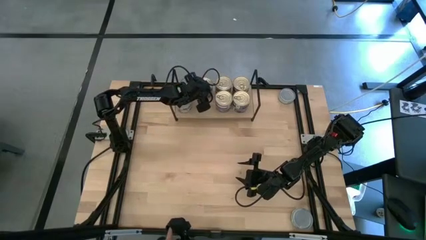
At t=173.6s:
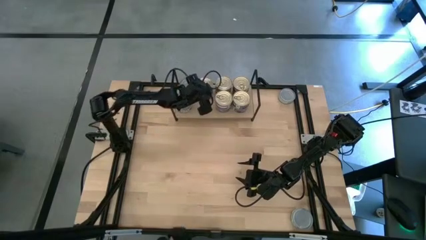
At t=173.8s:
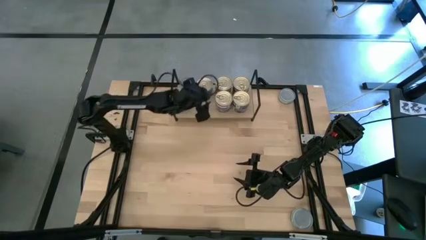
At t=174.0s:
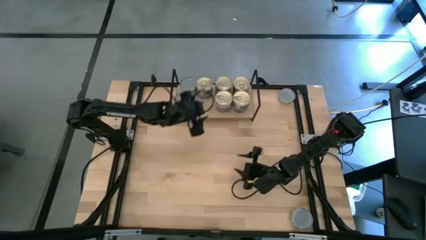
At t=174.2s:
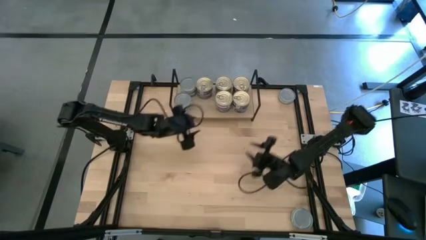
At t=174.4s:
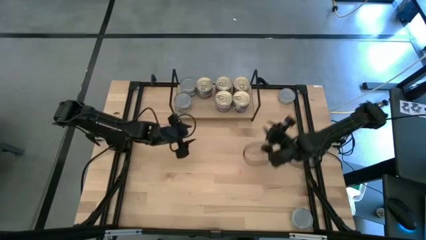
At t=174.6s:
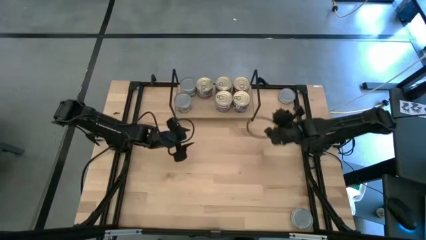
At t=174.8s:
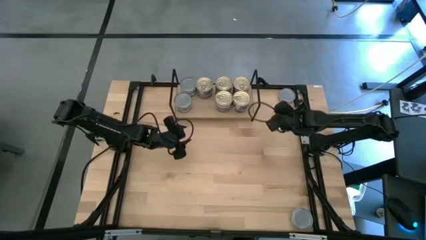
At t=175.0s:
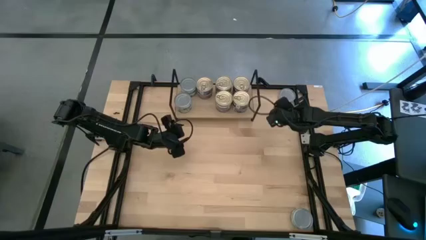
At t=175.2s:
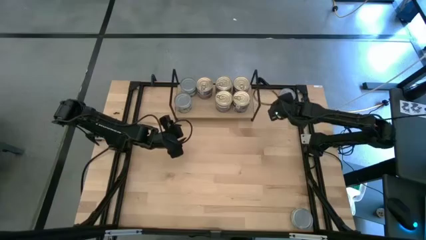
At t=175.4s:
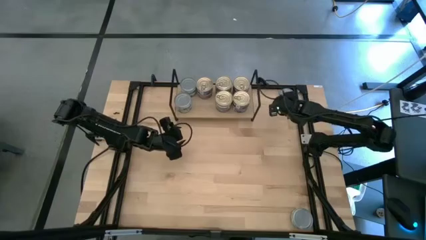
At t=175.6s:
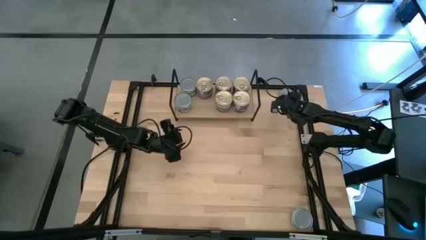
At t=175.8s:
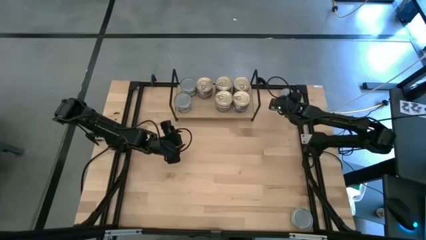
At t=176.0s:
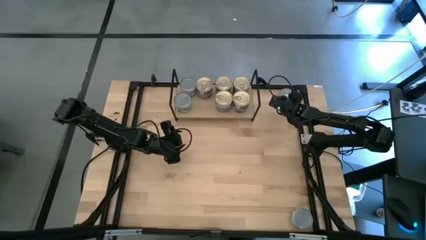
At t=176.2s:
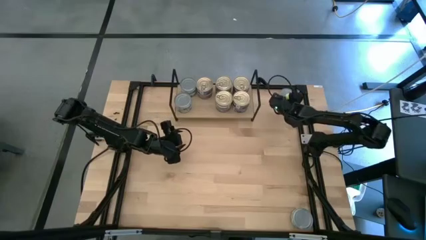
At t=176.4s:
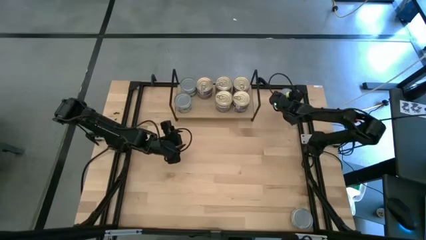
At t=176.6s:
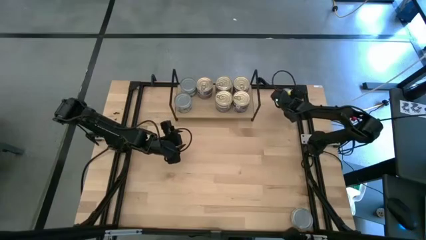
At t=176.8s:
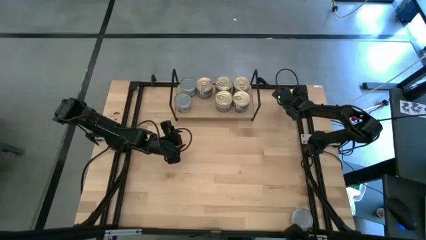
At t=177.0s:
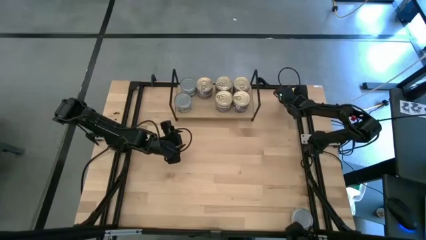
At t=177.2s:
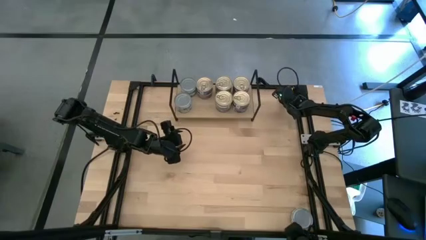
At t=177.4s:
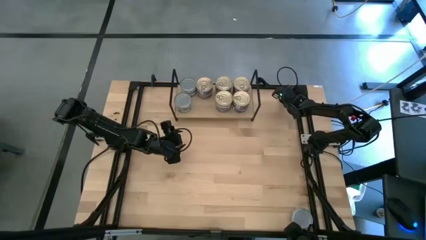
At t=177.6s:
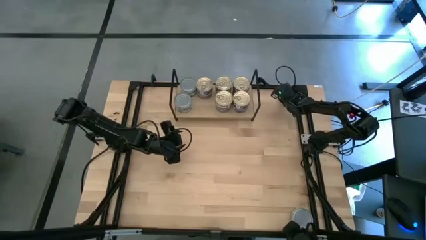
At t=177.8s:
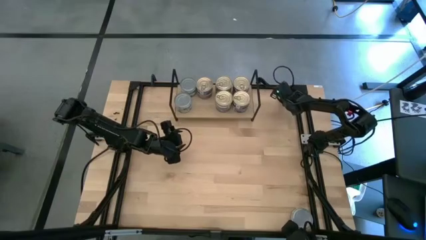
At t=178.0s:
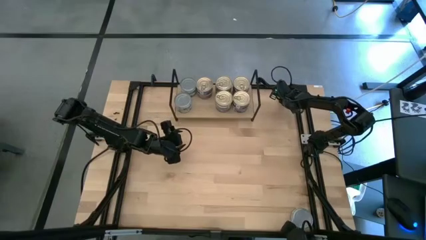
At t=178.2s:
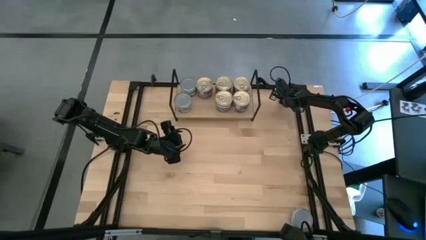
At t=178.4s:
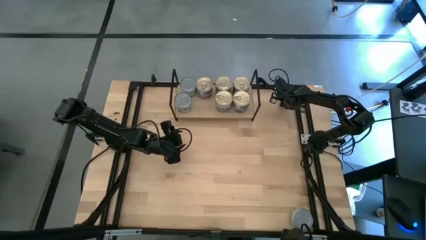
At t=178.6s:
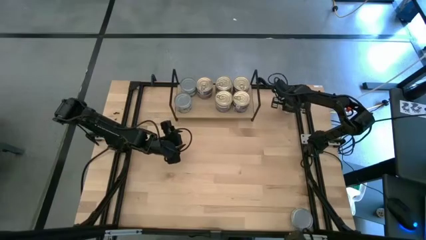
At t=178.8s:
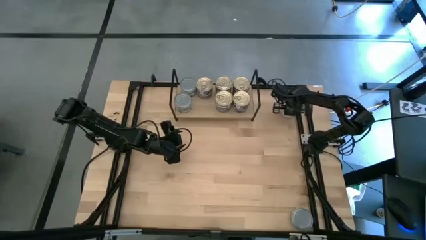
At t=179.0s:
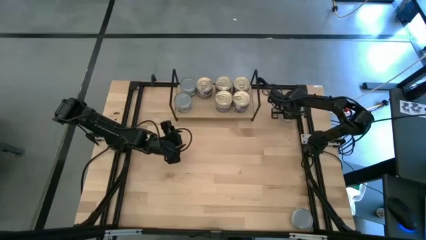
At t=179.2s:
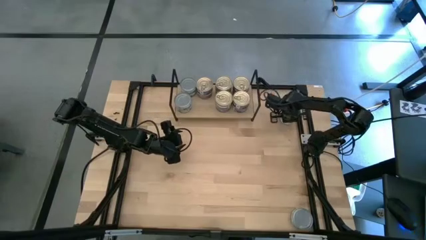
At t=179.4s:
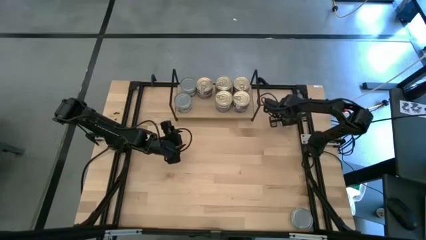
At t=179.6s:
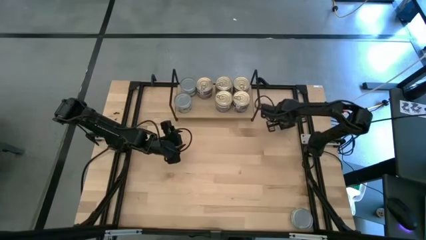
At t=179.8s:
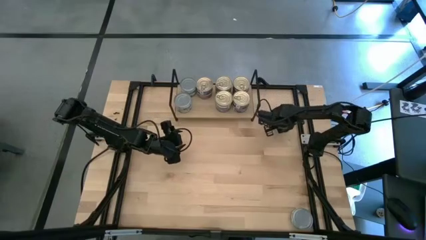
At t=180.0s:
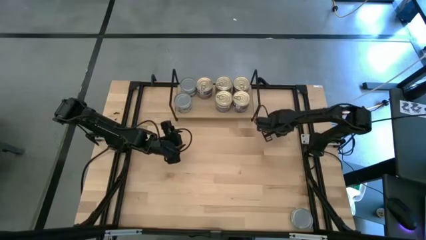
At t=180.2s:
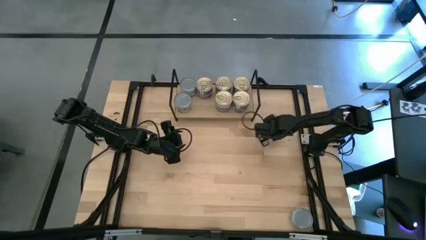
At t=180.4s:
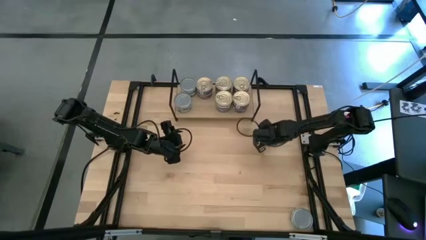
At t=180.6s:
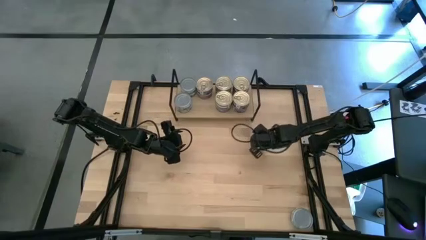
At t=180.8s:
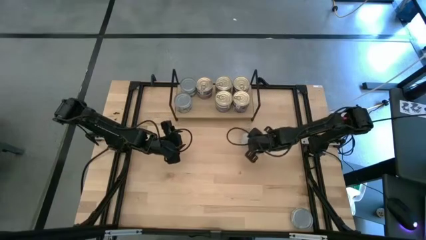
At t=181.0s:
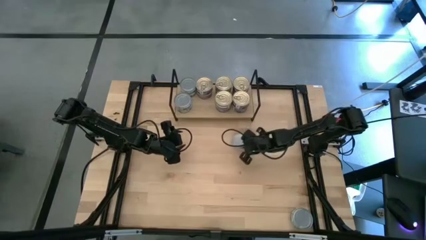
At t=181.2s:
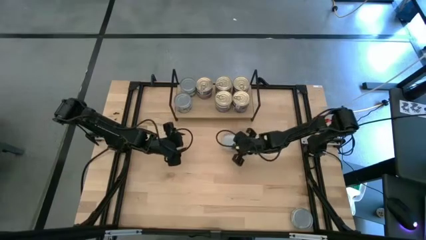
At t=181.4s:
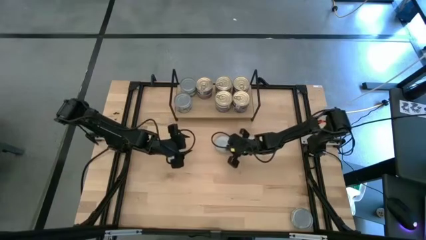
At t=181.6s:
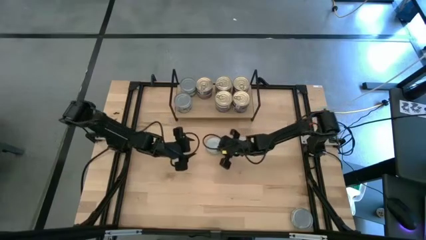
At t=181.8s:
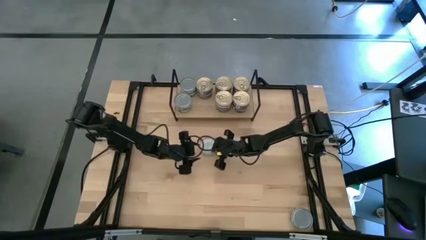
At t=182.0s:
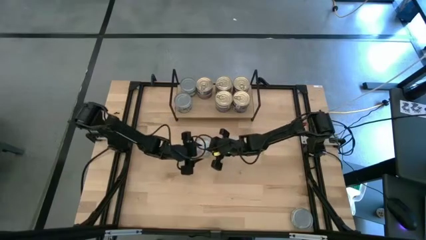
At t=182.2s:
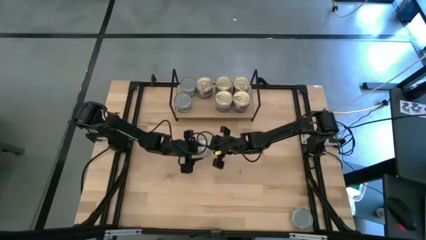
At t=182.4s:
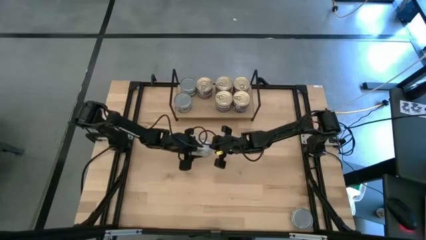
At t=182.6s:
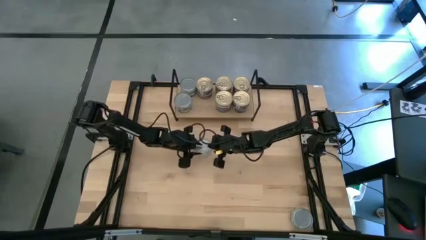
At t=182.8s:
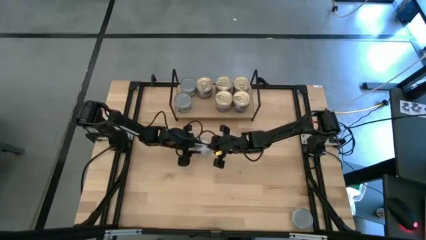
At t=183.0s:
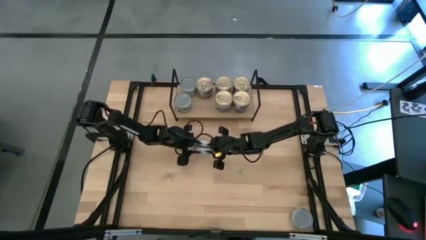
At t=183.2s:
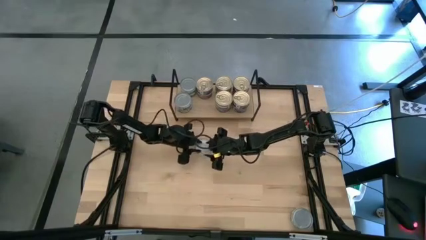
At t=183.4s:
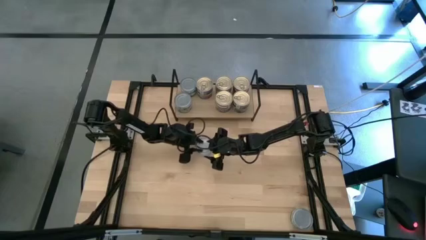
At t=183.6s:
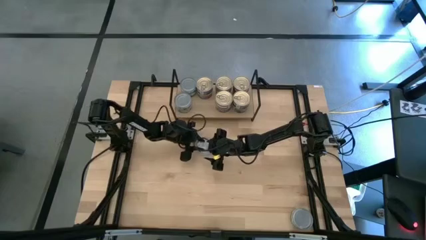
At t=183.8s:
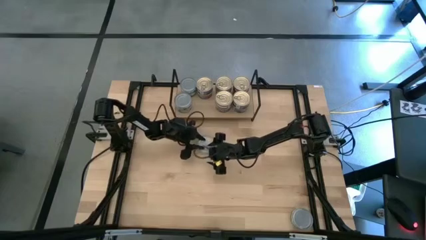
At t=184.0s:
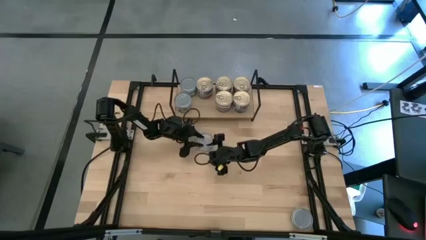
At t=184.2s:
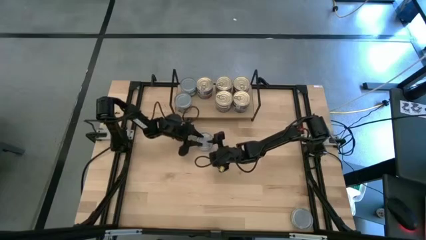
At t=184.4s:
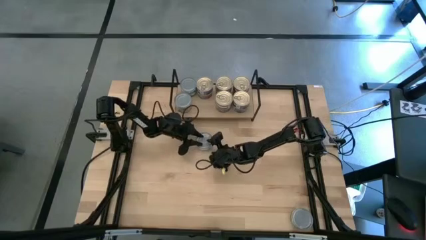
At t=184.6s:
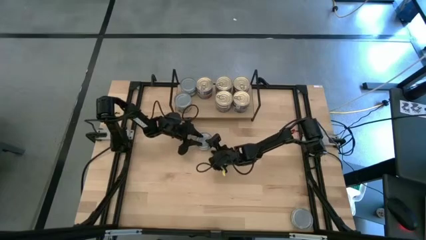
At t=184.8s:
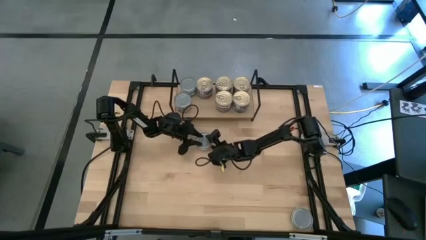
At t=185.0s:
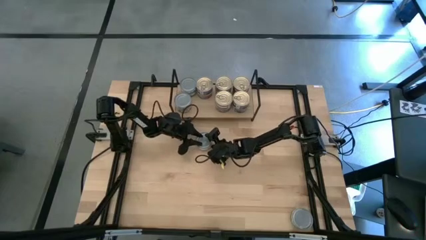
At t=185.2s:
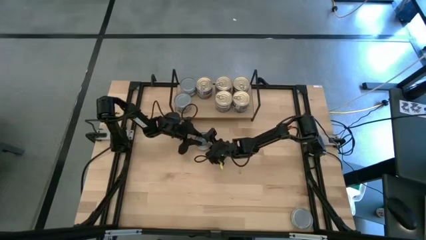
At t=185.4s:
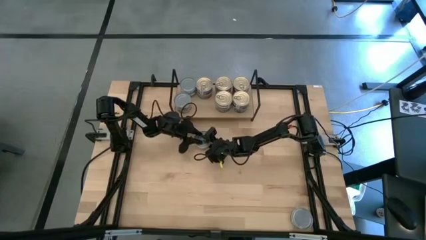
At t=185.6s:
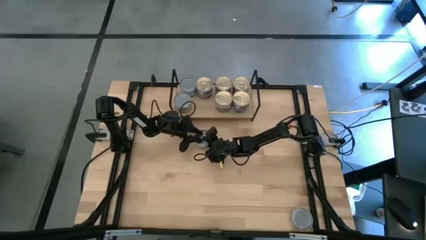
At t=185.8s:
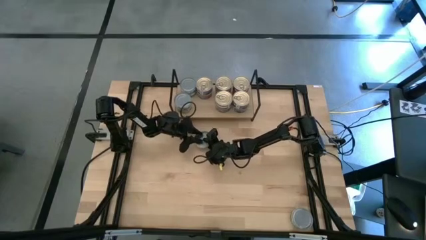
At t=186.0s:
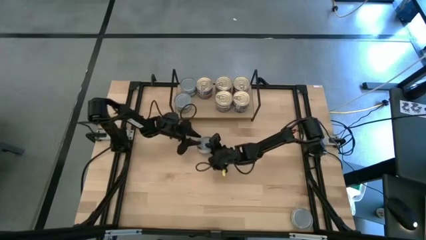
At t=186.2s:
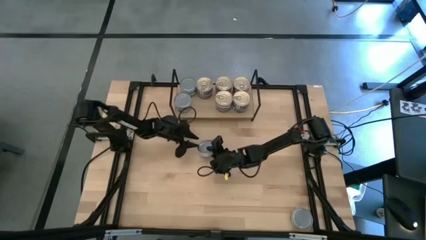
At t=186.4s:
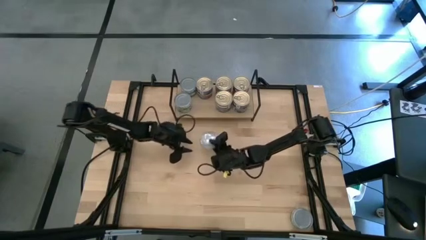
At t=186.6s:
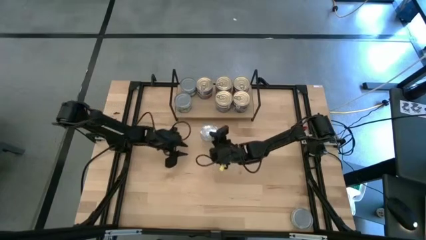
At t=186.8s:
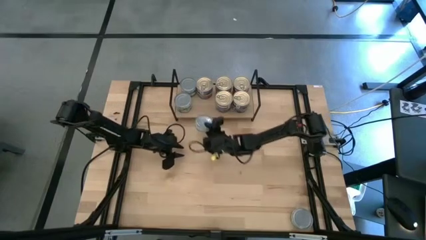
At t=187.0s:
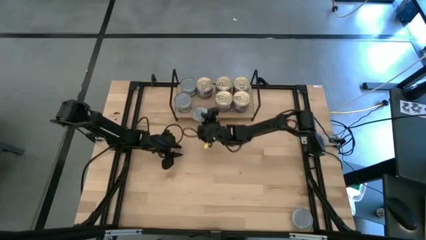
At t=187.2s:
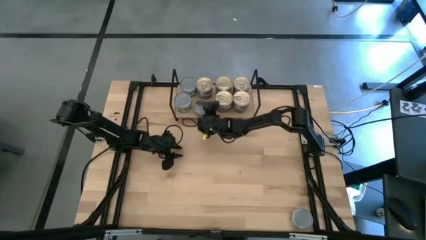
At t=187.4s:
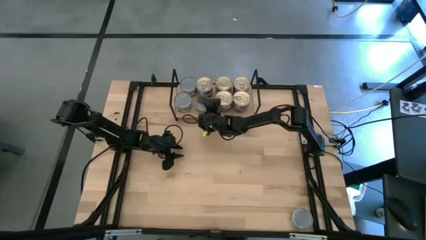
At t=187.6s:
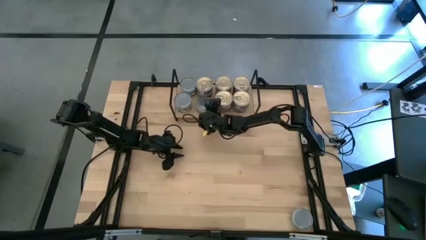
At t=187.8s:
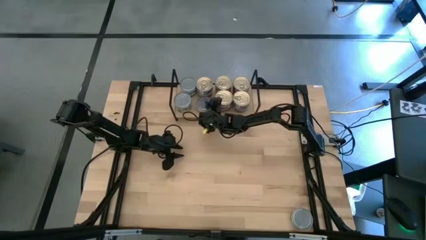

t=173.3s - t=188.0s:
Task: Stack canned seafood by type on shelf
Put the green and white tuna can on the shelf to the right of the other green and white tuna can

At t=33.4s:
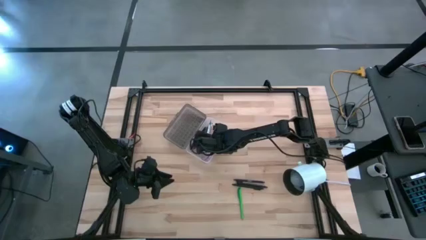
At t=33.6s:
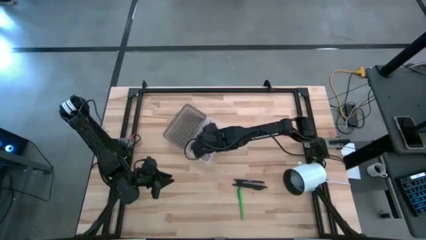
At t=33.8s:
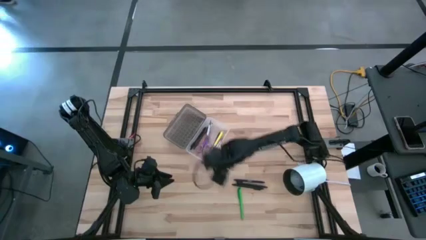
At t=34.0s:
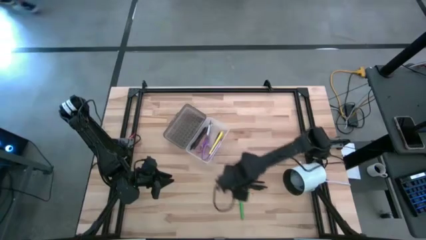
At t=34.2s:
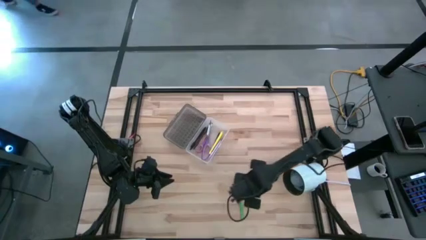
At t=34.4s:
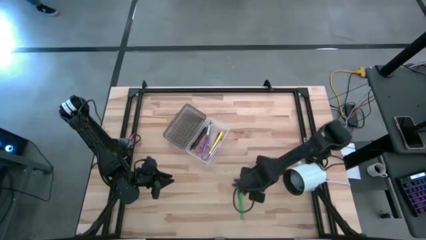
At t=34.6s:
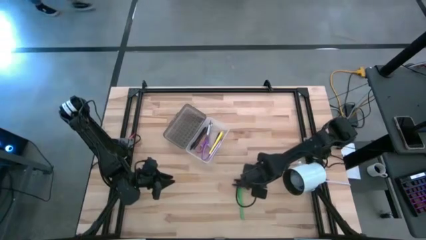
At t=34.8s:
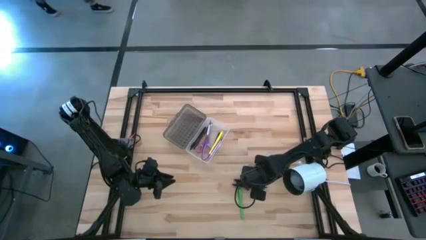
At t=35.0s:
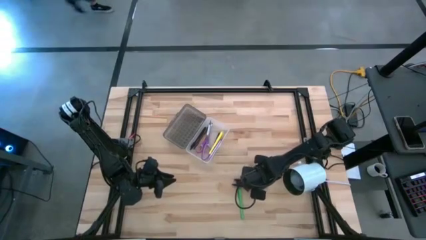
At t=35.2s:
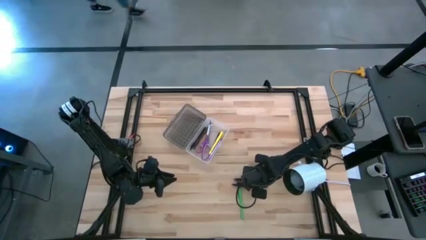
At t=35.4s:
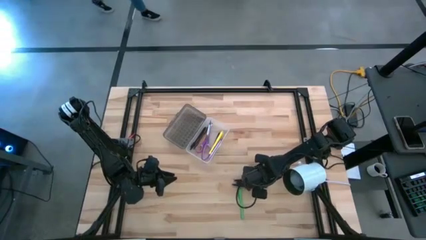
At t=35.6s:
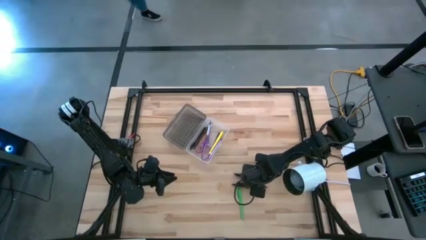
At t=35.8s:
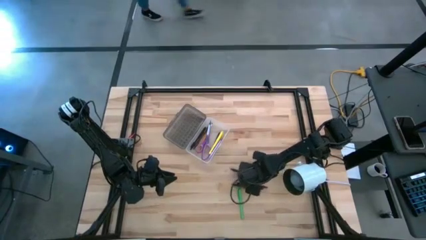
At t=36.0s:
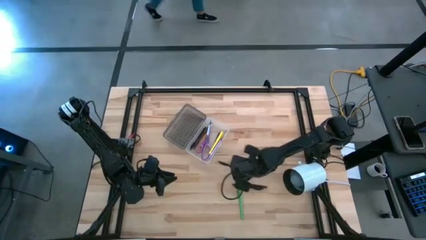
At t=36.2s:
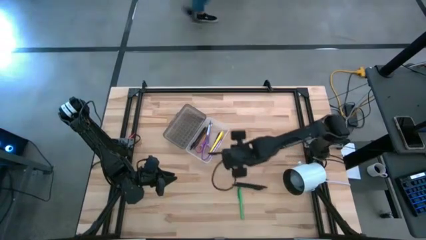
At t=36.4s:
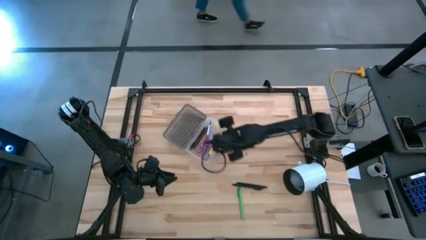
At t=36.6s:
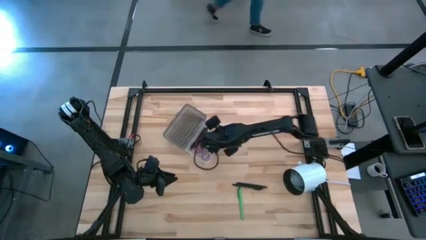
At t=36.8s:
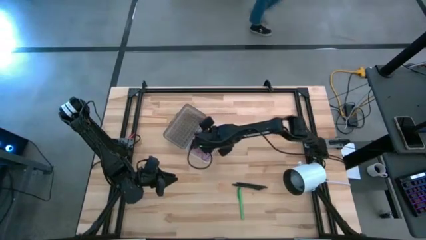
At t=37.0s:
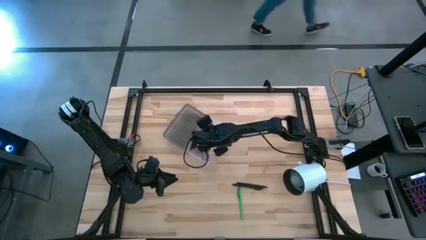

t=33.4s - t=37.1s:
Task: Pick & place school supplies into a supply box
Put the black pen into the black supply box
